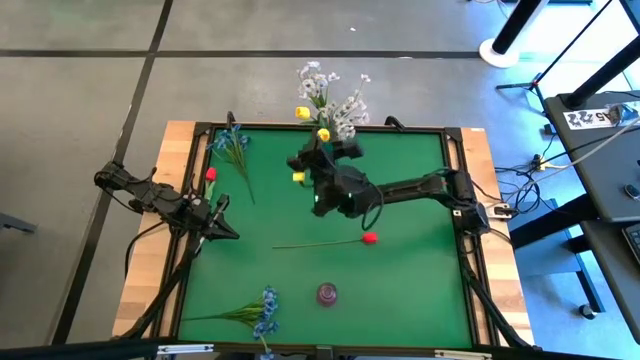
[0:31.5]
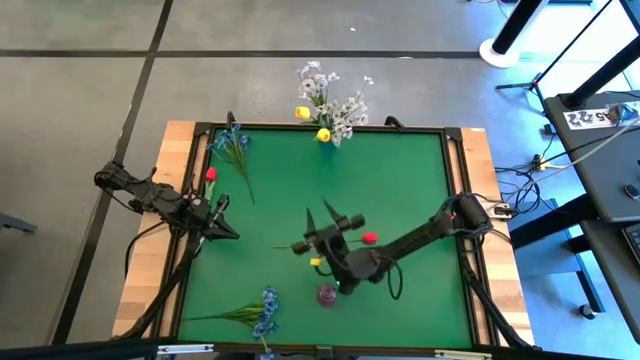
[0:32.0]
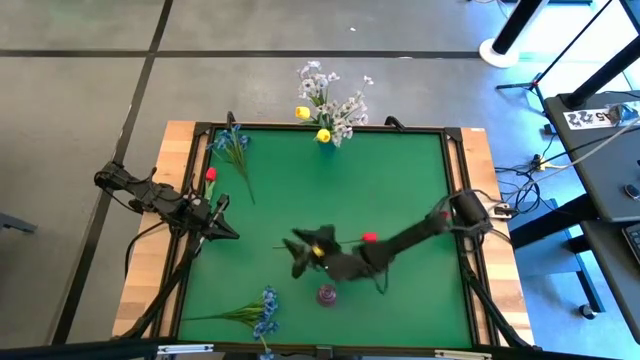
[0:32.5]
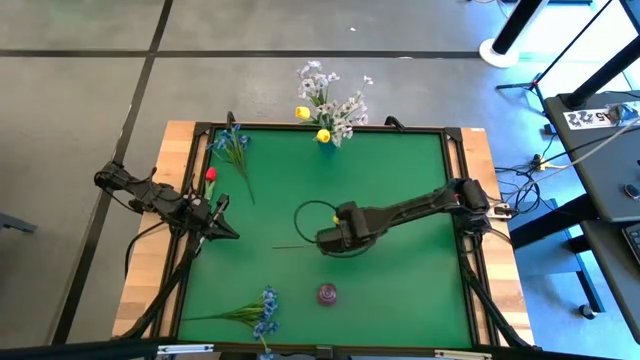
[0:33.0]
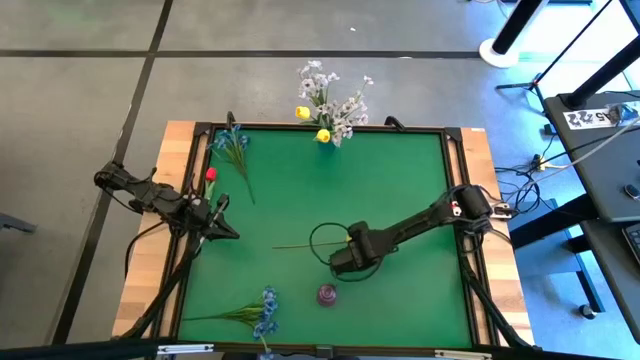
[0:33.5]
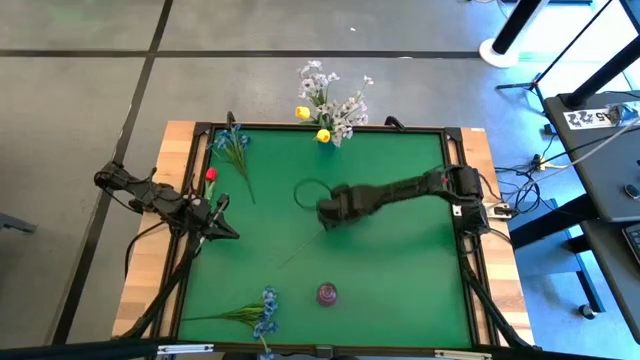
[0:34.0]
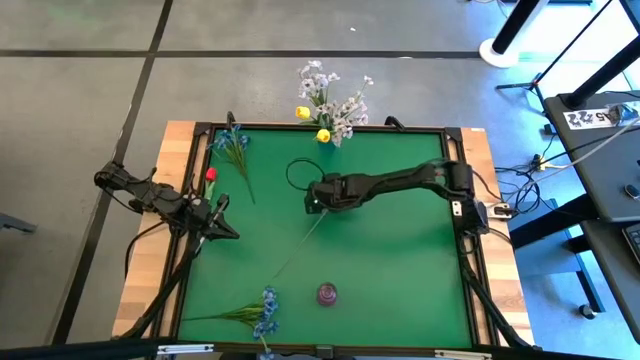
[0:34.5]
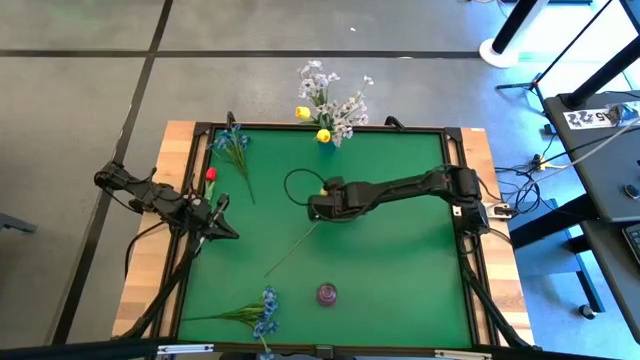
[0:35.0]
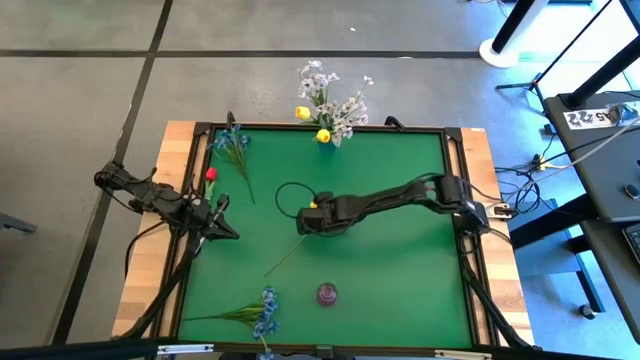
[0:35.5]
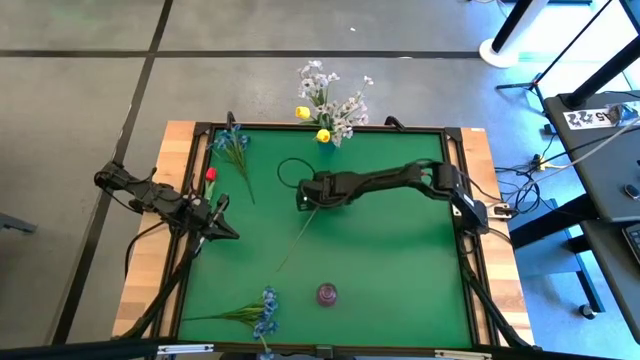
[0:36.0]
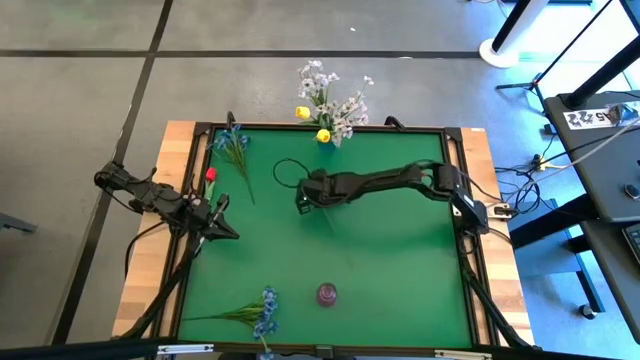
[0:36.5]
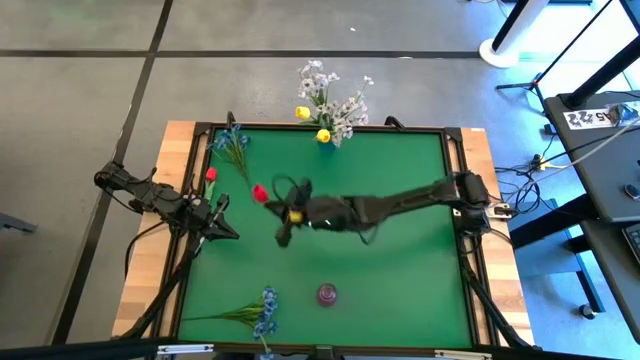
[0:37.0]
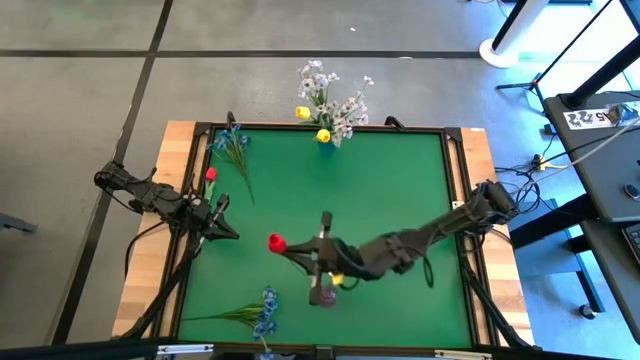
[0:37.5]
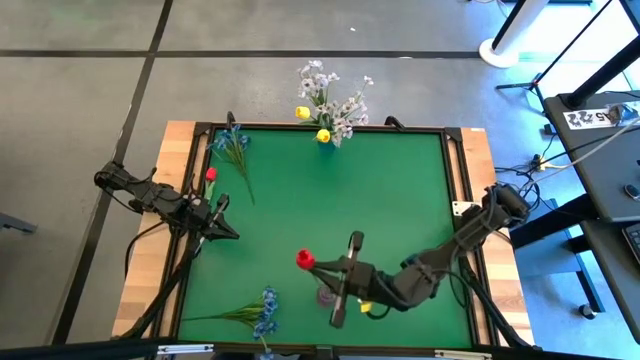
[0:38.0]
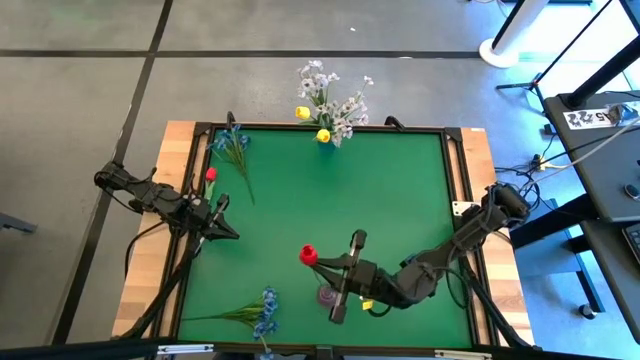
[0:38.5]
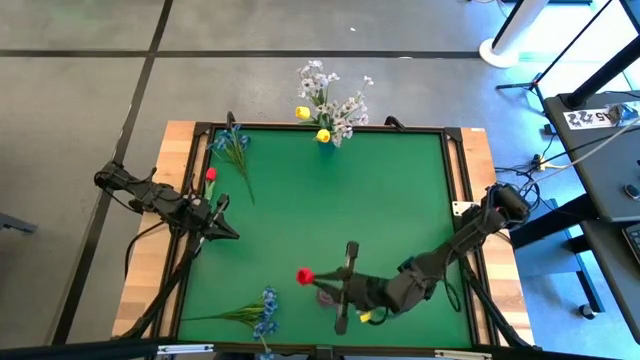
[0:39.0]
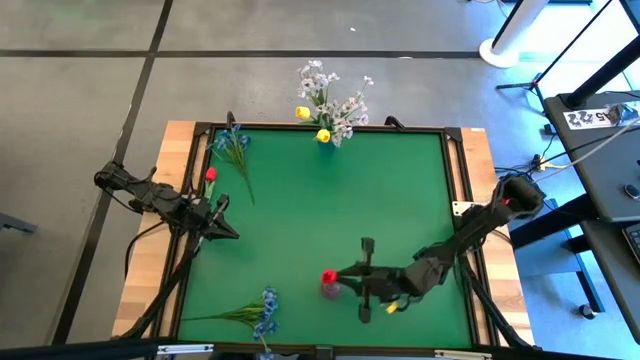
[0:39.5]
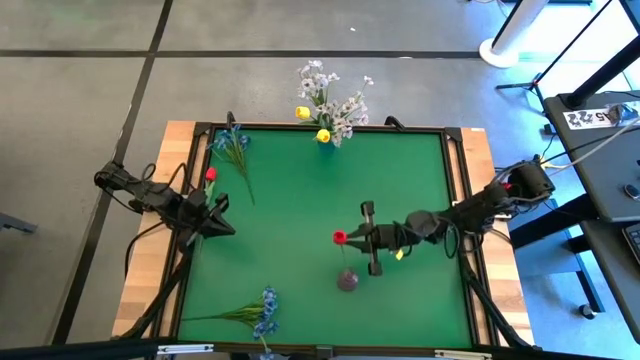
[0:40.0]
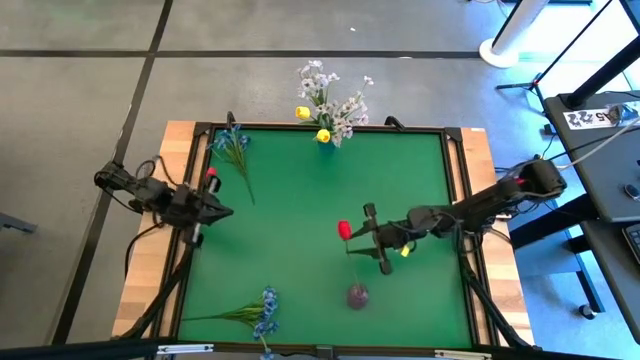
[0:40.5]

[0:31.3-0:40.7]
Task: Sort flowers into vase by color
Put the right red tulip into the purple flower vase

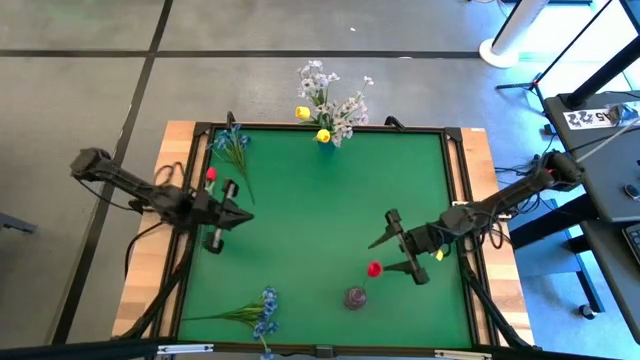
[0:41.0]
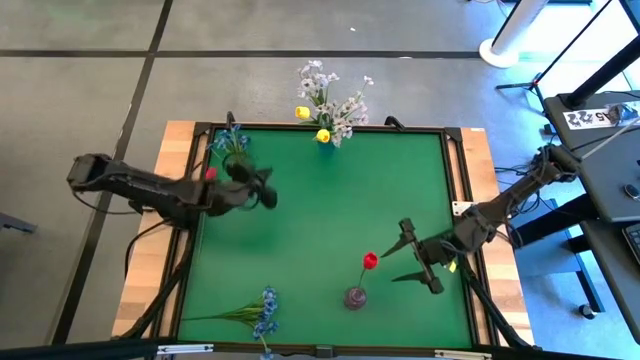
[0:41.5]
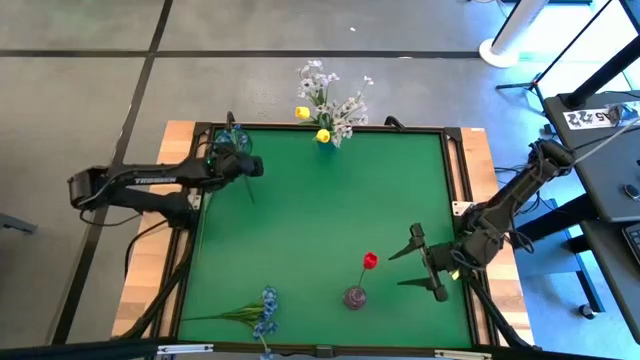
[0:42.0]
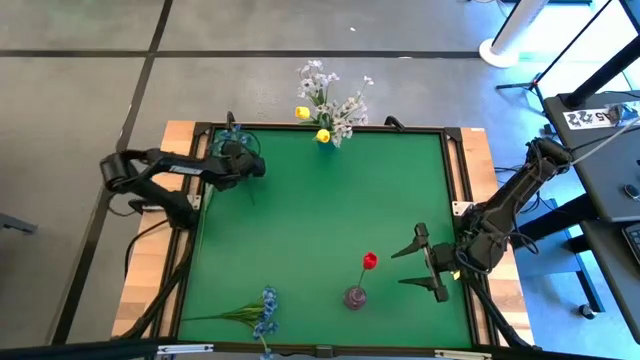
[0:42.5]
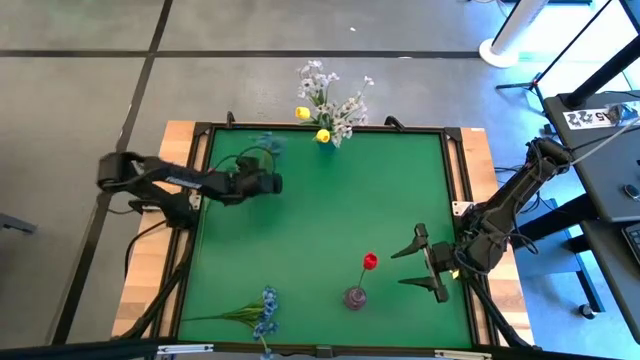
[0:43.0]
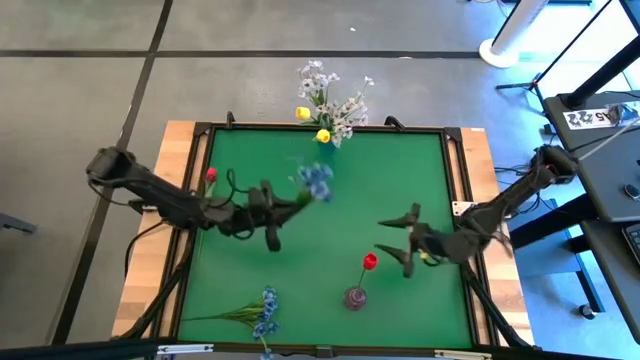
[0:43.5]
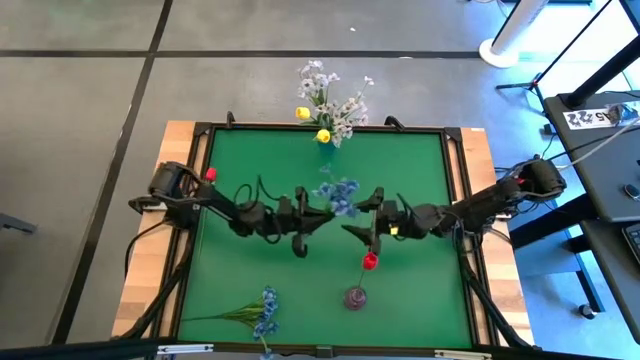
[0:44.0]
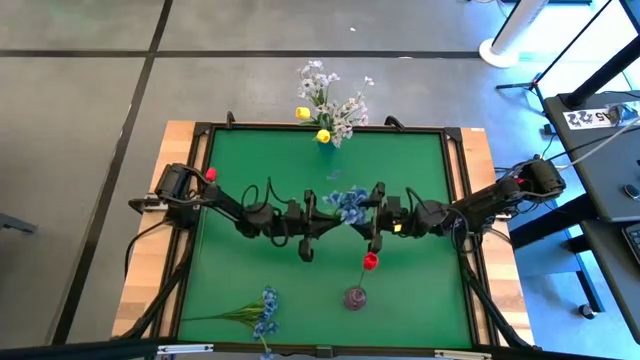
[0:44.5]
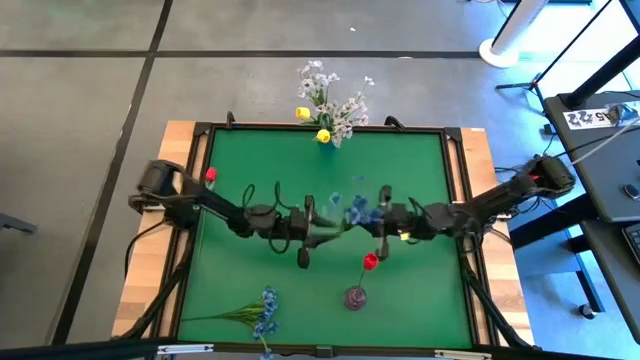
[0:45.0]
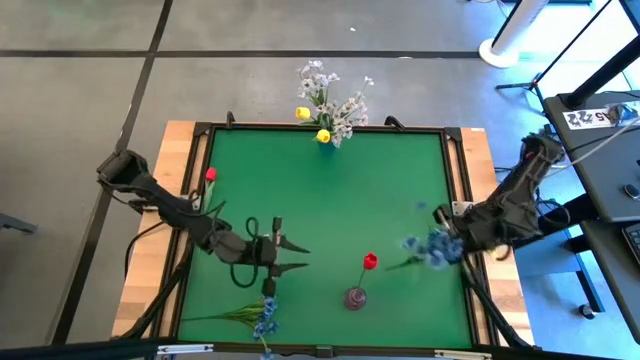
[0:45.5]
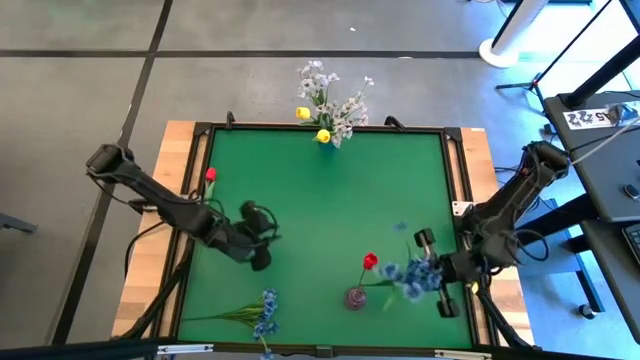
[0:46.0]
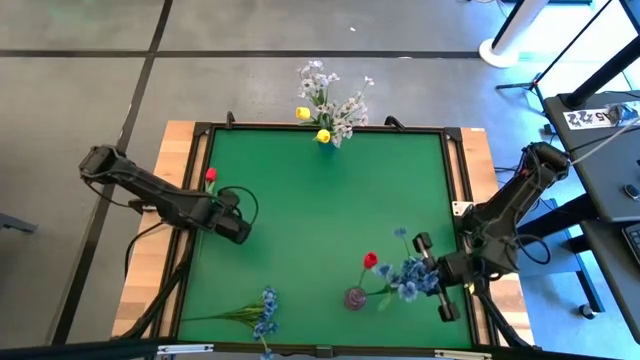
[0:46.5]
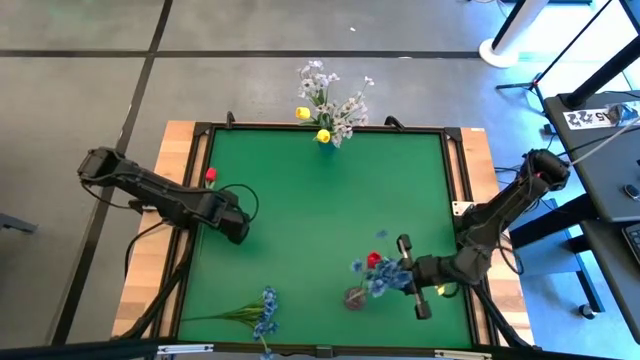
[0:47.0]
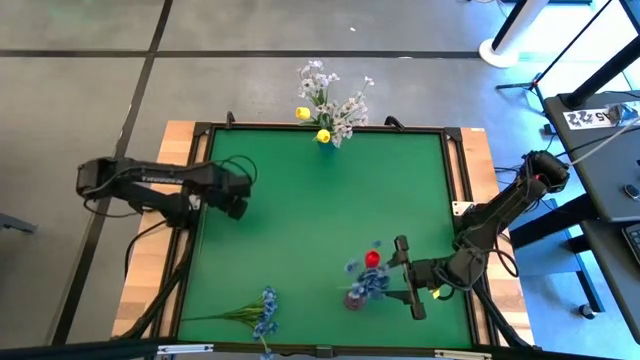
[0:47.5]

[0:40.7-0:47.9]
Put the top blue flowers into the purple flower vase

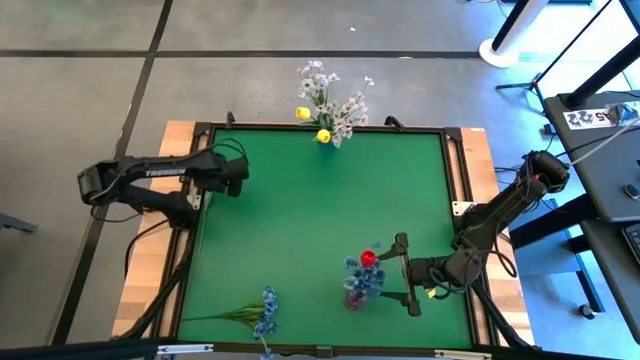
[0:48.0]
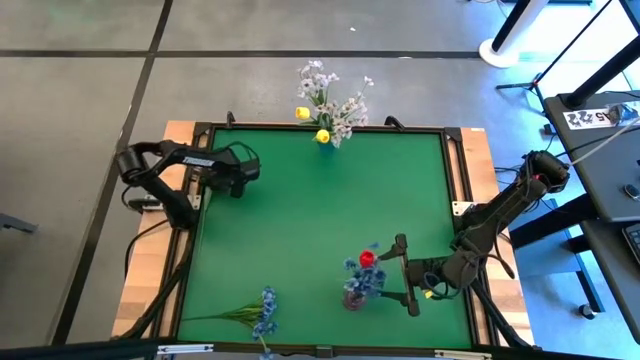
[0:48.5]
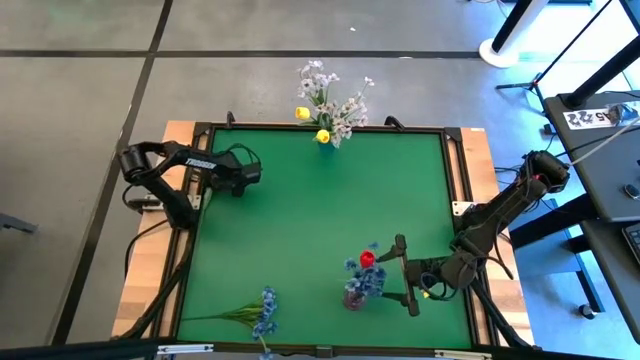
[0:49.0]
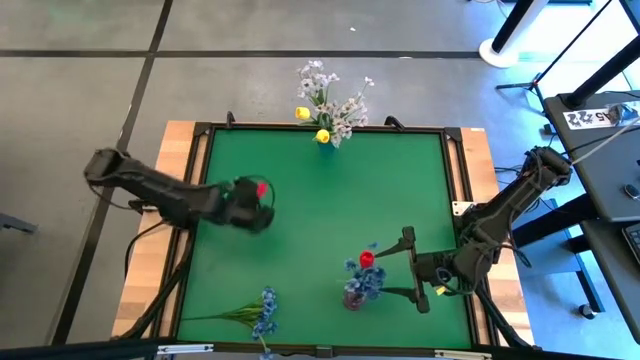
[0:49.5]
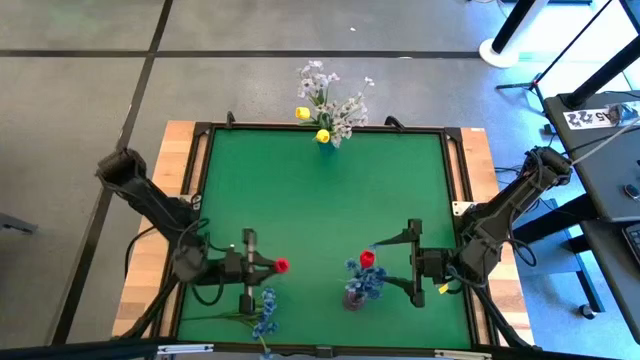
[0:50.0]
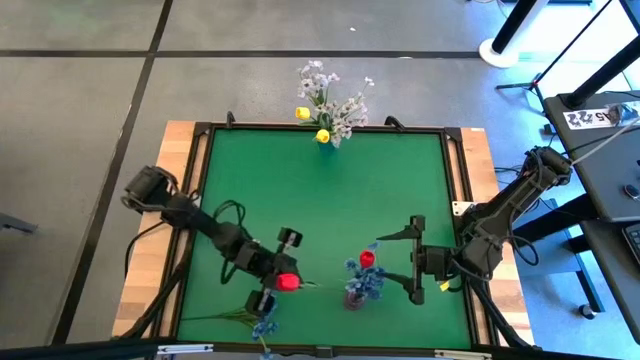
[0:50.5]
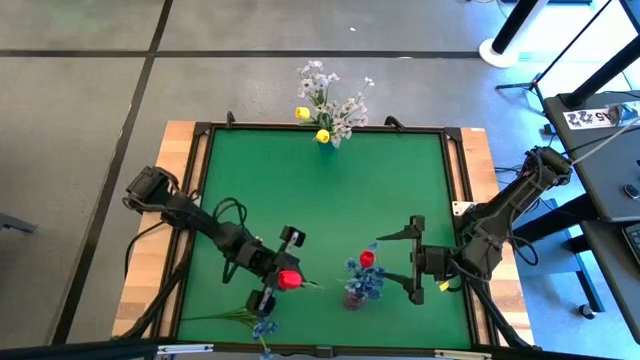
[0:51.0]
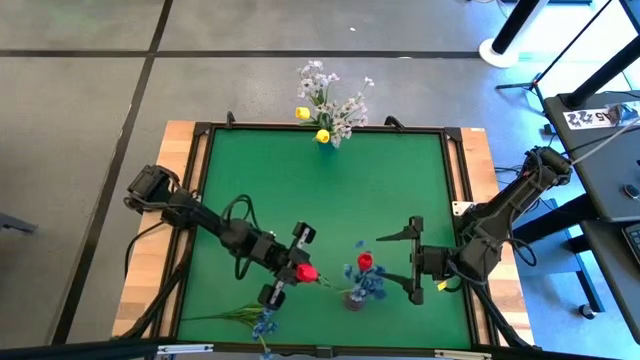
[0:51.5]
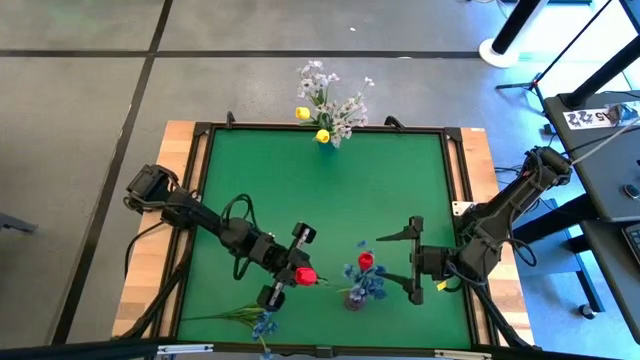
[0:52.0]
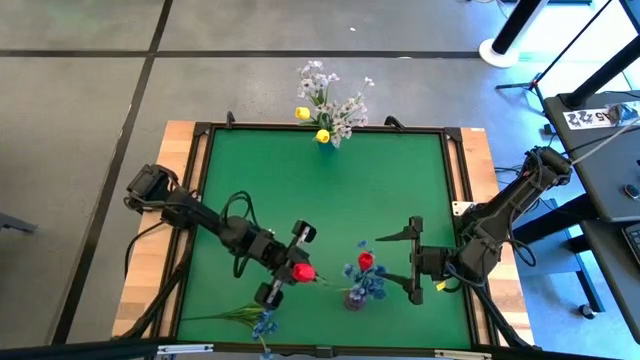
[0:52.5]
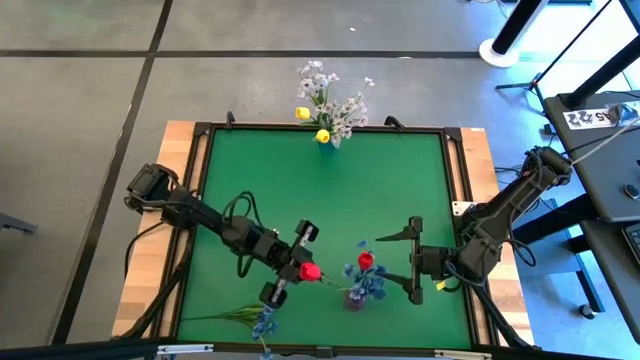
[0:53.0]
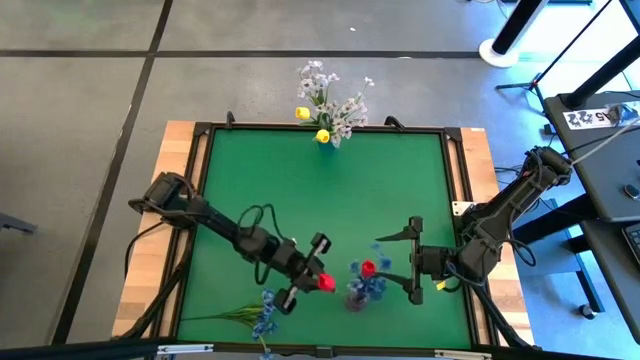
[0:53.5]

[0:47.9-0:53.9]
Put the red tulip into the purple flower vase
